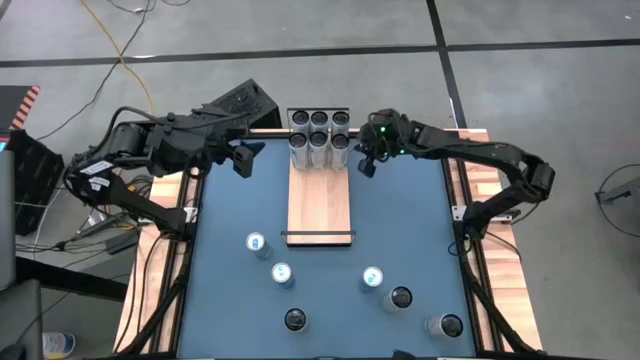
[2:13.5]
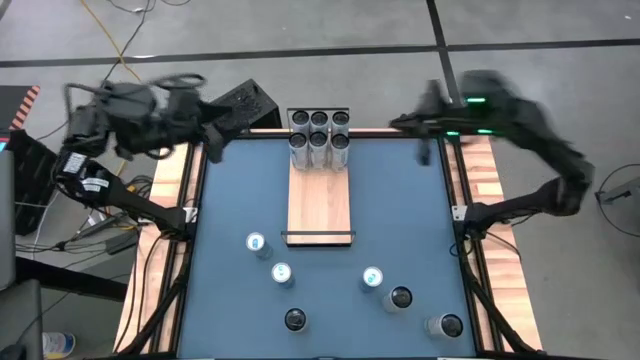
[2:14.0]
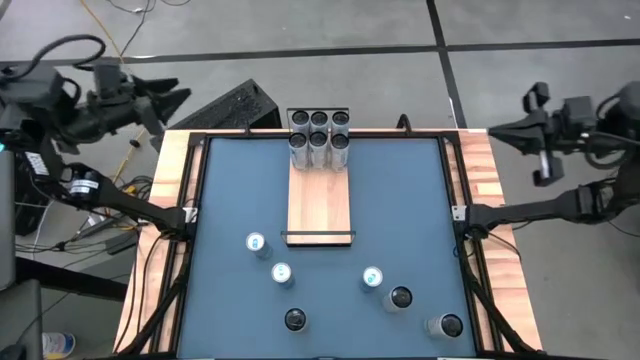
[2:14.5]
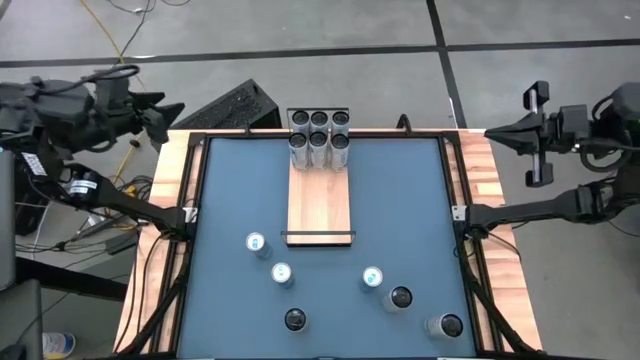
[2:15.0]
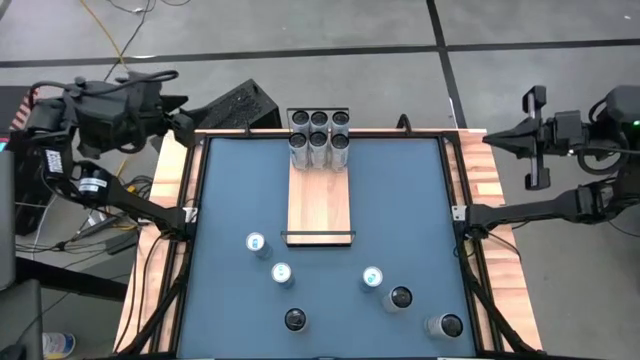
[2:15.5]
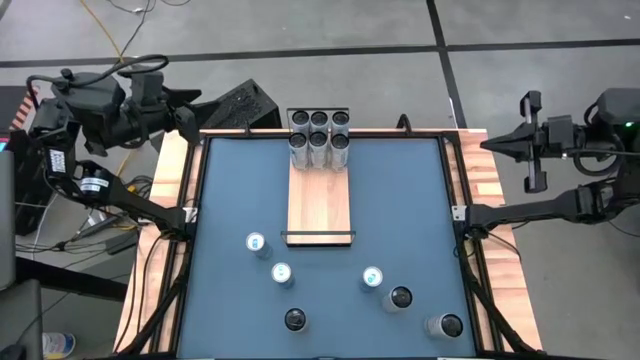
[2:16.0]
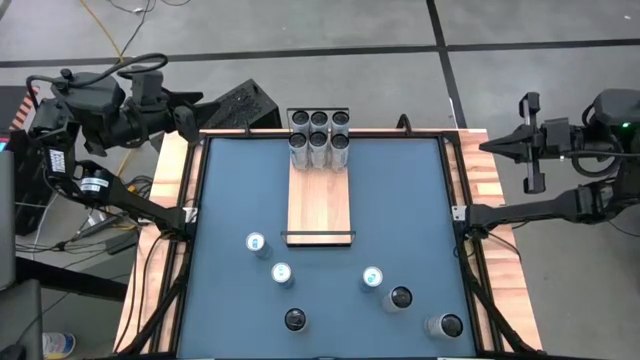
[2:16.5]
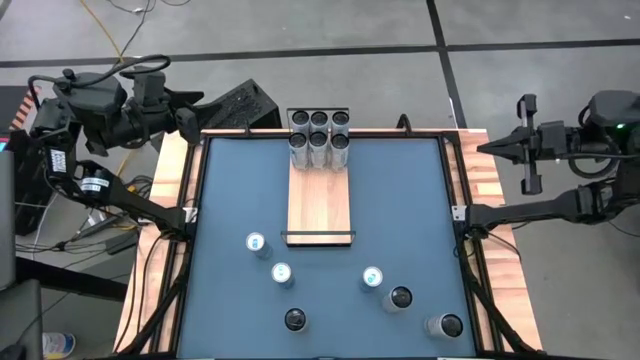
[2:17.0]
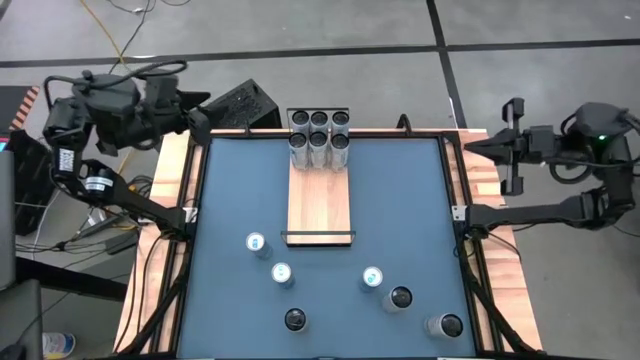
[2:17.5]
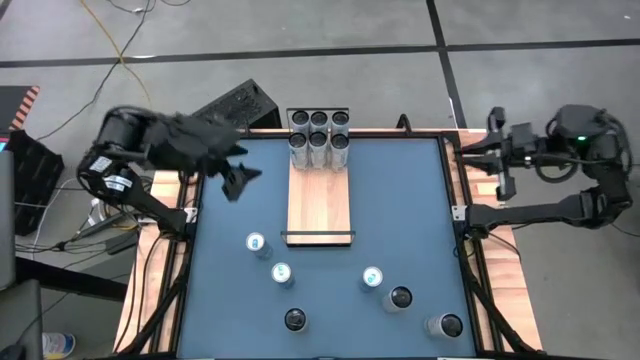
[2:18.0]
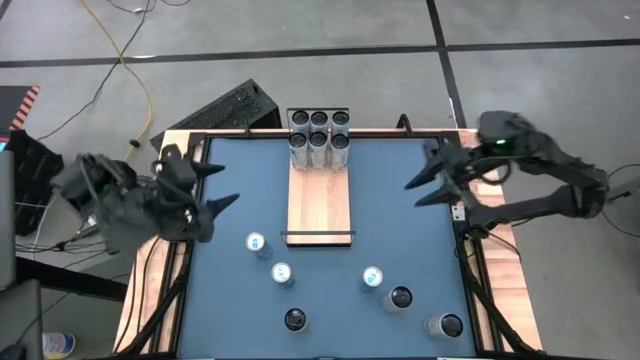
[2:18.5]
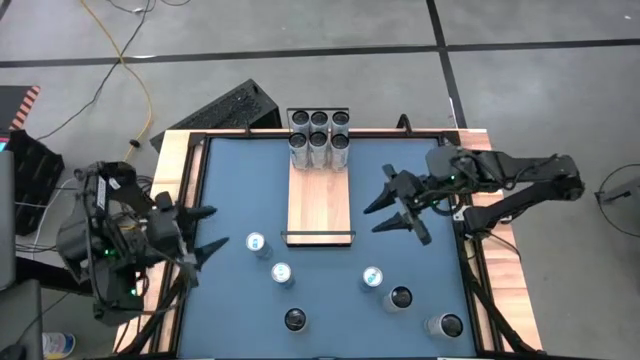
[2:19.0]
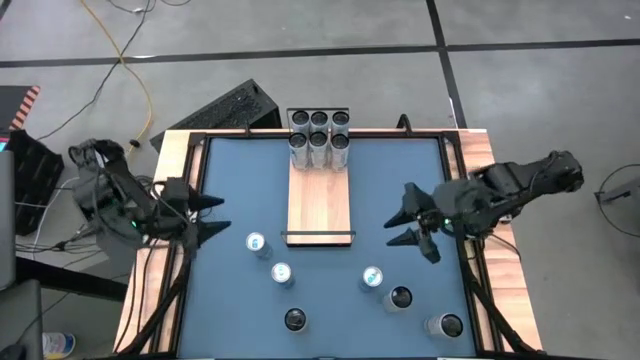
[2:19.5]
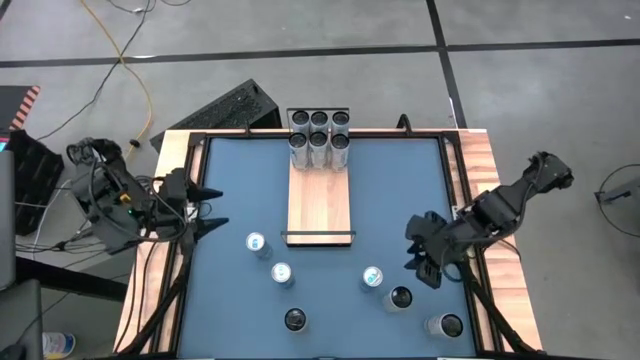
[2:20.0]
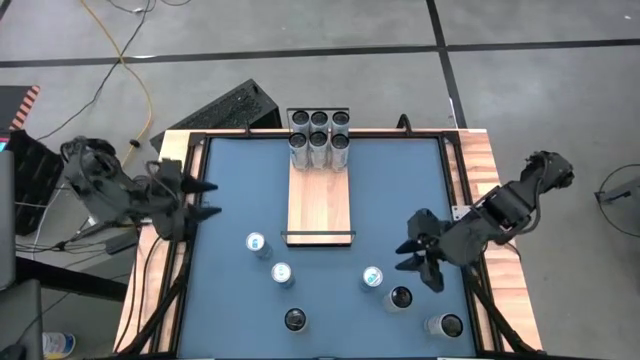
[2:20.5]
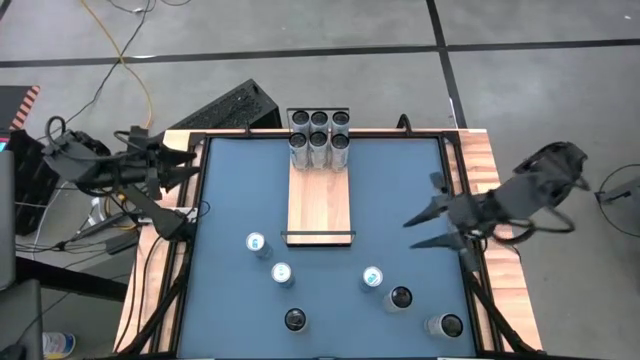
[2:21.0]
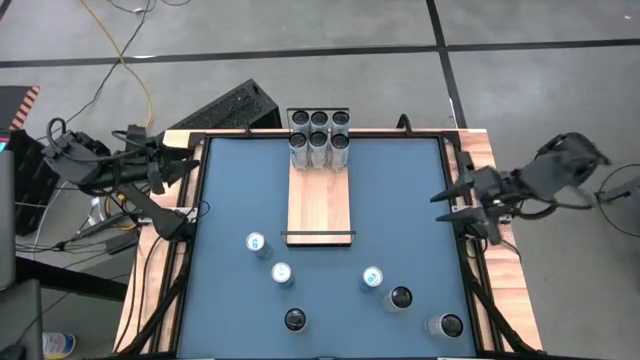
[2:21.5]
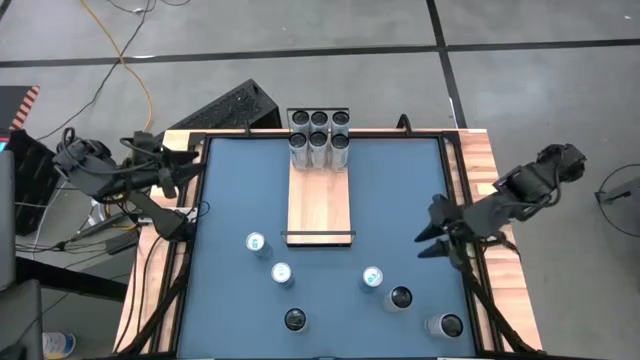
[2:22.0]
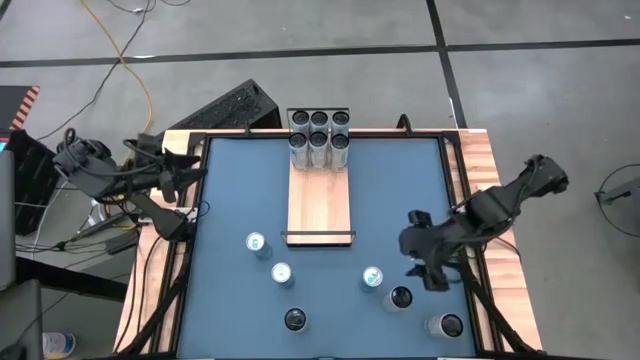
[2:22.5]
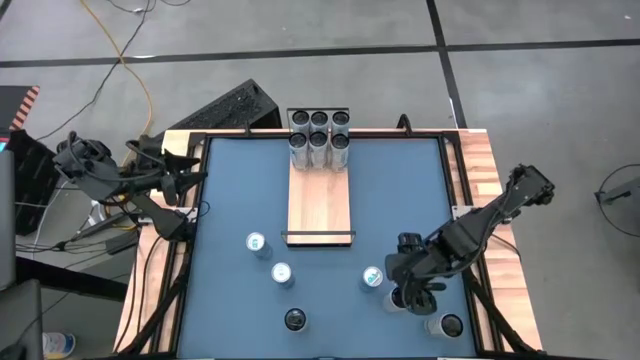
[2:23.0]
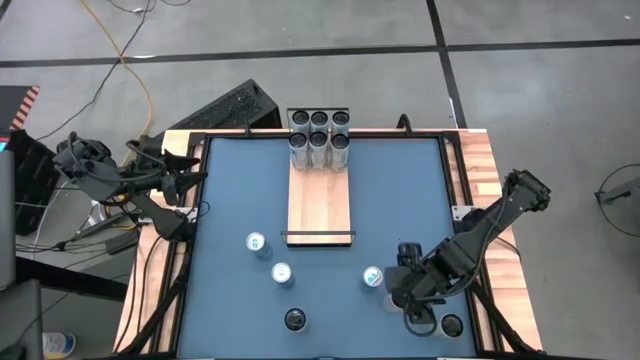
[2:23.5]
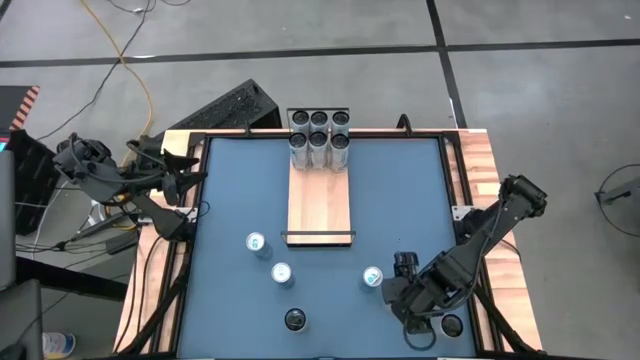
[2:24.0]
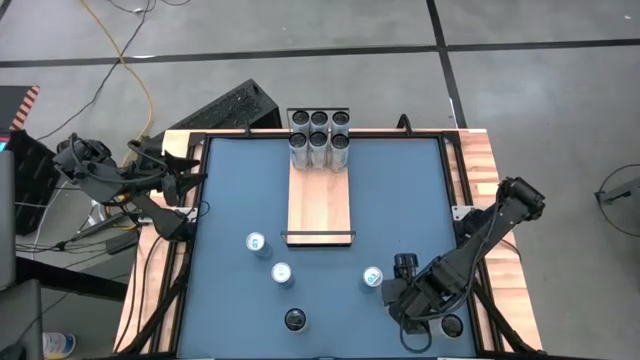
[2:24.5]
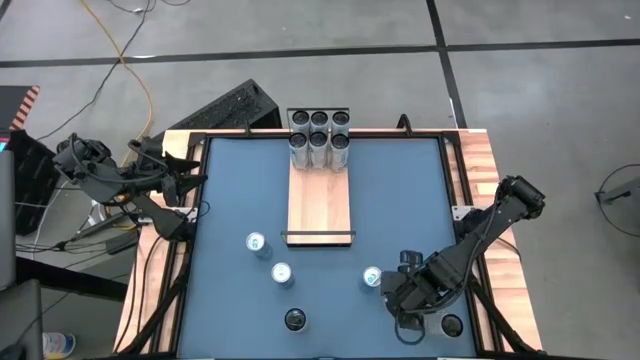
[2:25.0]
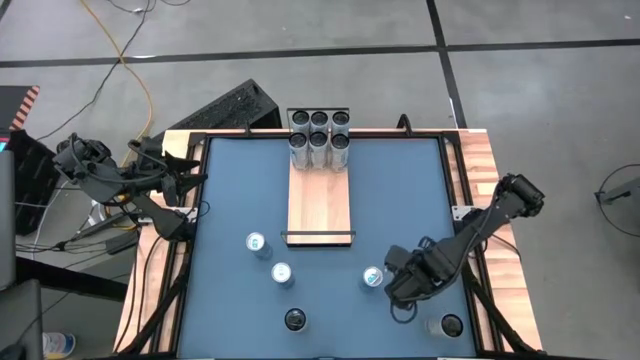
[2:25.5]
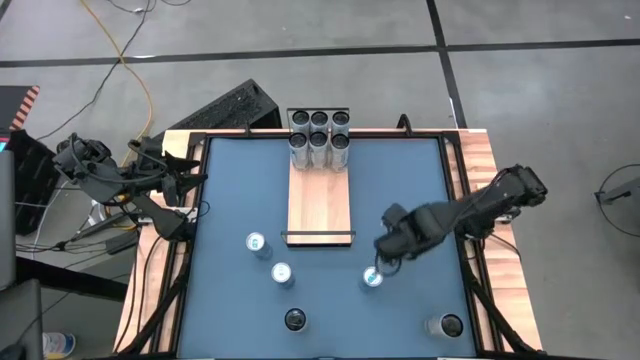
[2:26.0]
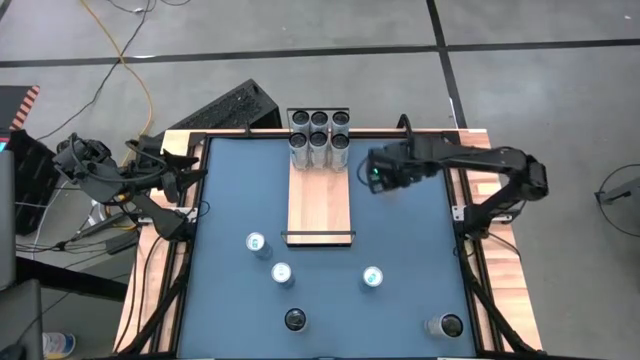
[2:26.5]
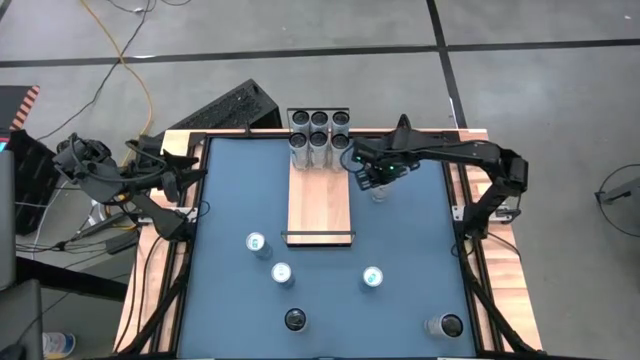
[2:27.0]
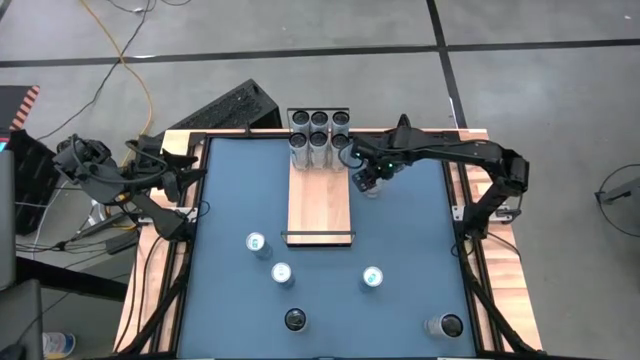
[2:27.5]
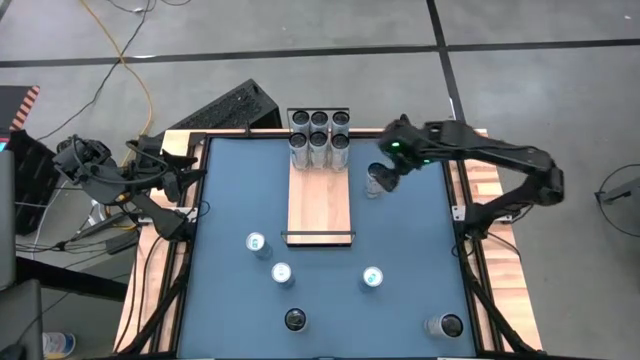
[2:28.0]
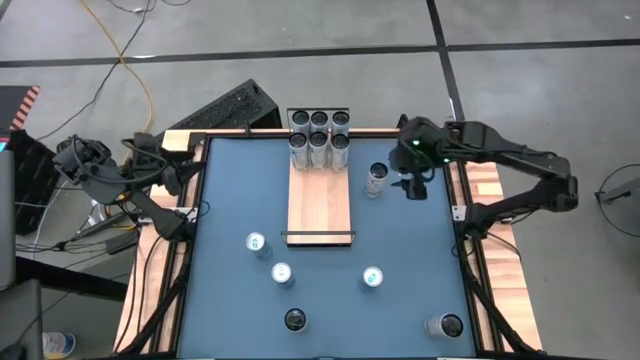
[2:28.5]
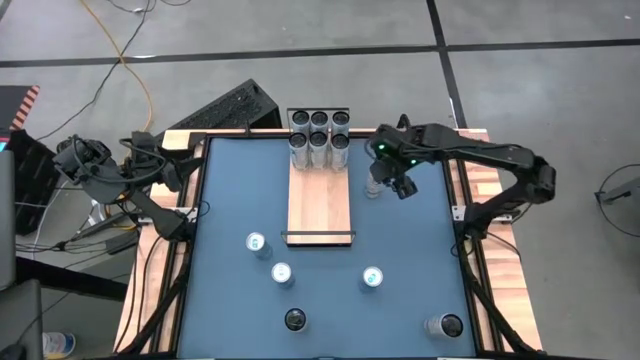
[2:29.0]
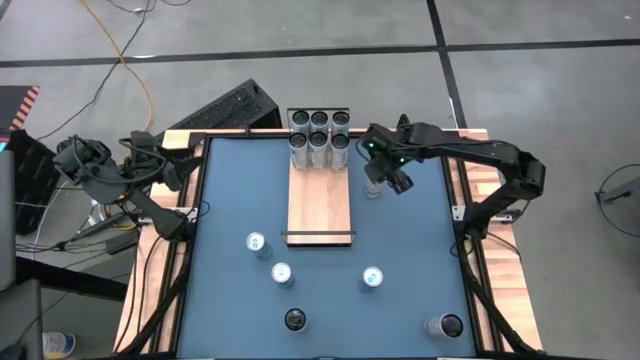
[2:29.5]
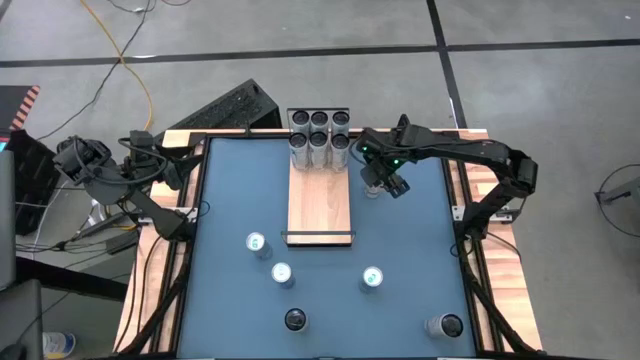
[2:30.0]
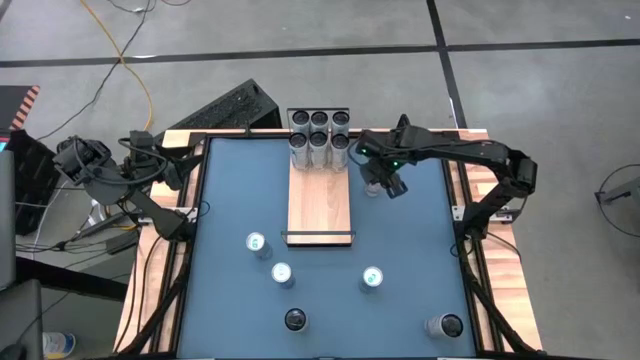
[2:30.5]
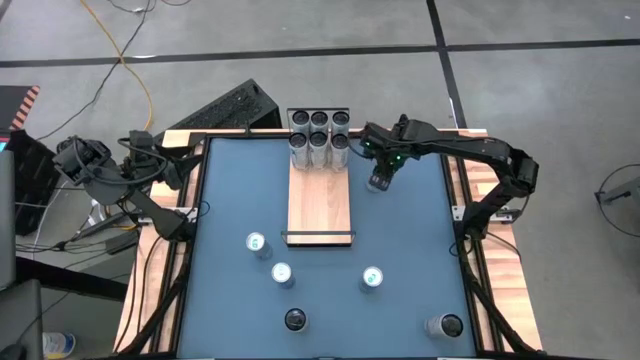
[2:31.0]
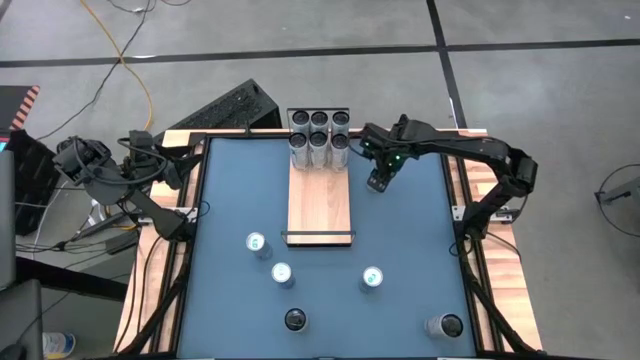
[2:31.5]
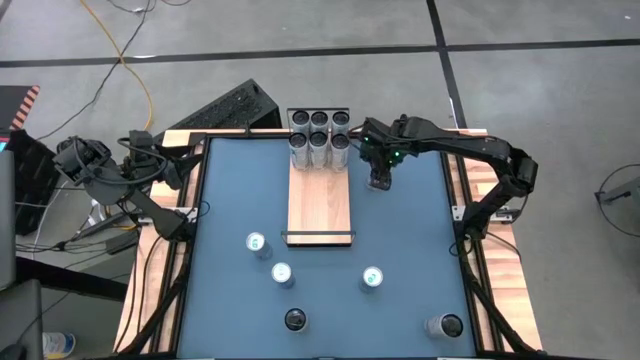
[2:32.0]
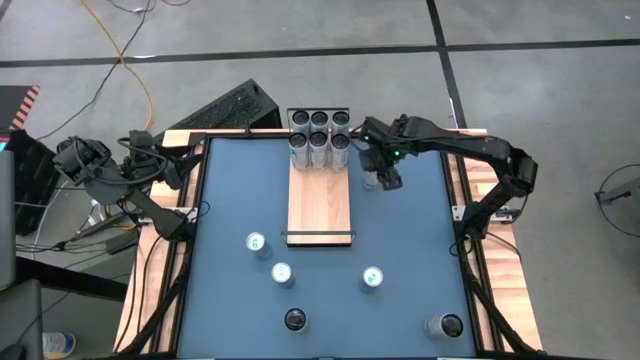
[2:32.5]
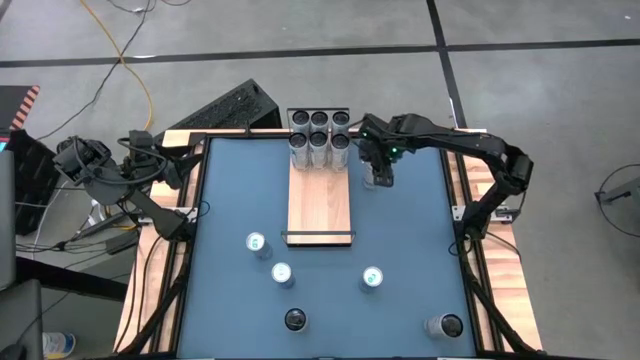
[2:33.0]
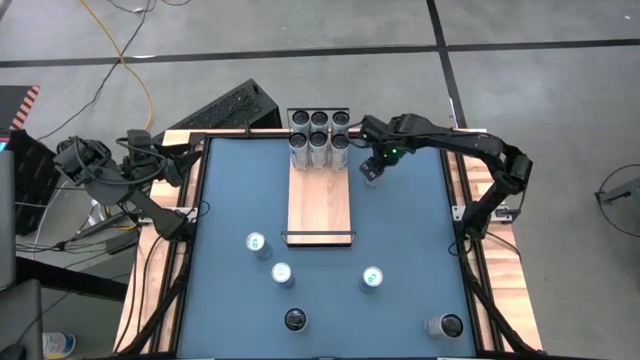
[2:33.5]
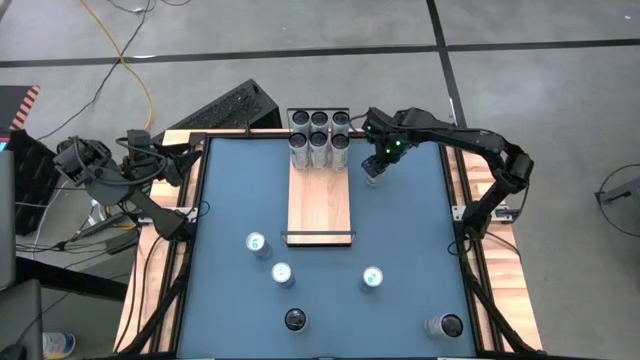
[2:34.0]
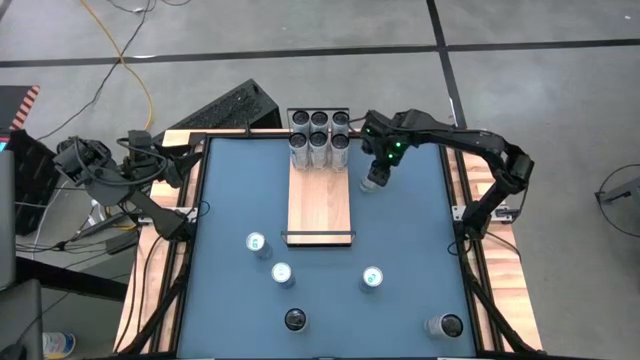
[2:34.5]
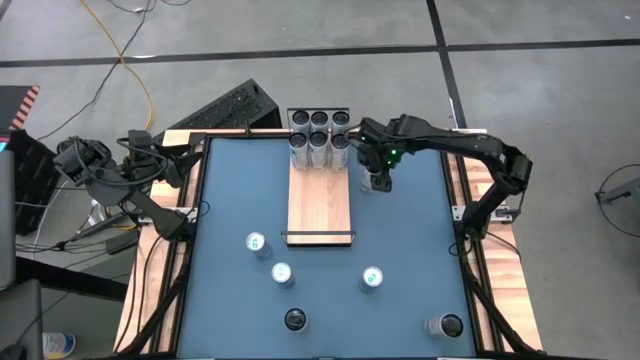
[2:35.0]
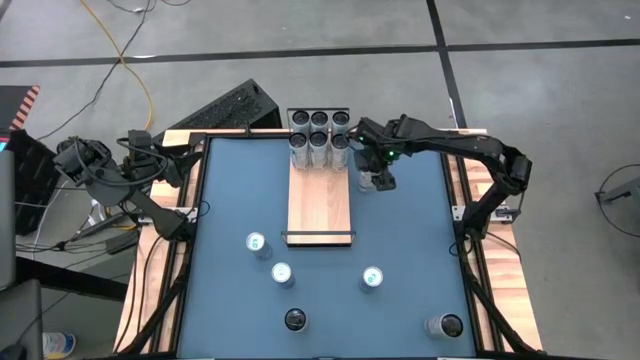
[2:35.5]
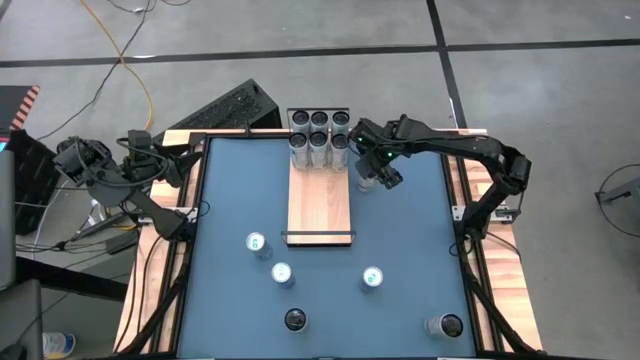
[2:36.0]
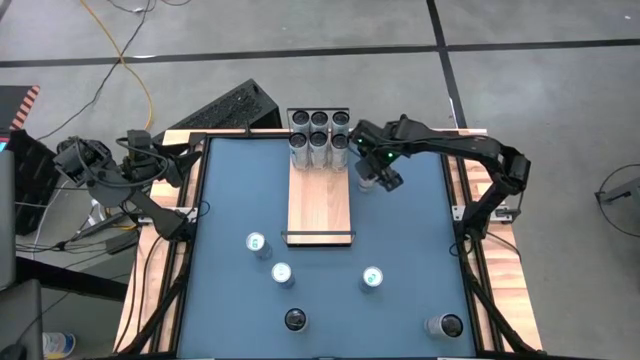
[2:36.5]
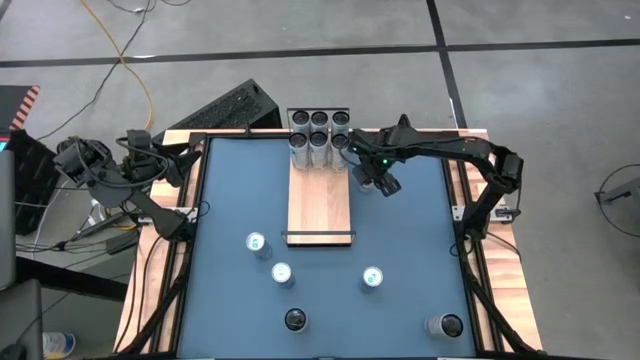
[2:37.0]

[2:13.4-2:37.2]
Task: Place canned beverage on shelf
Put the center white-yellow soda can on the shelf
